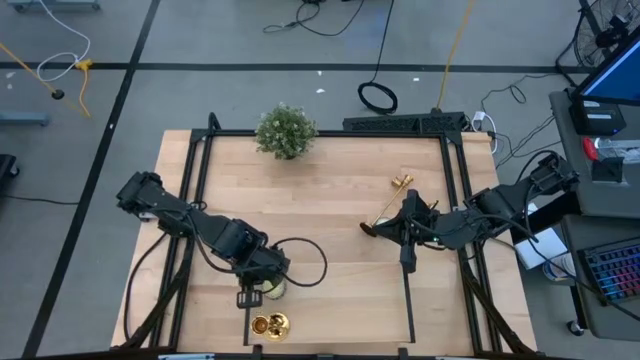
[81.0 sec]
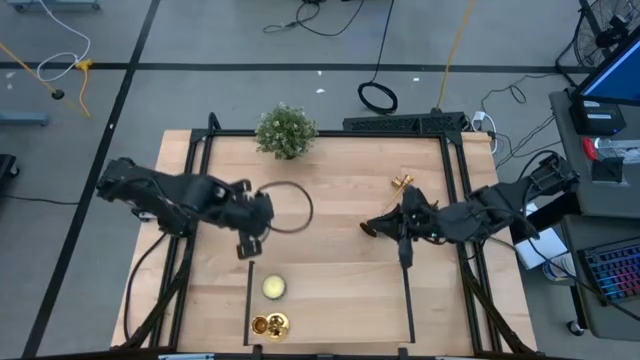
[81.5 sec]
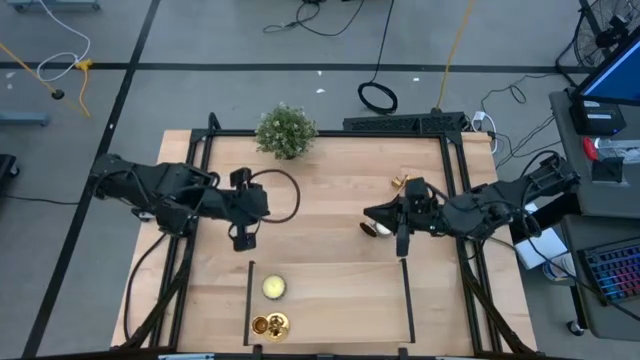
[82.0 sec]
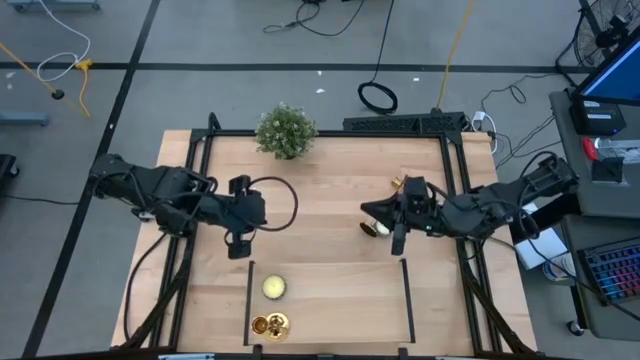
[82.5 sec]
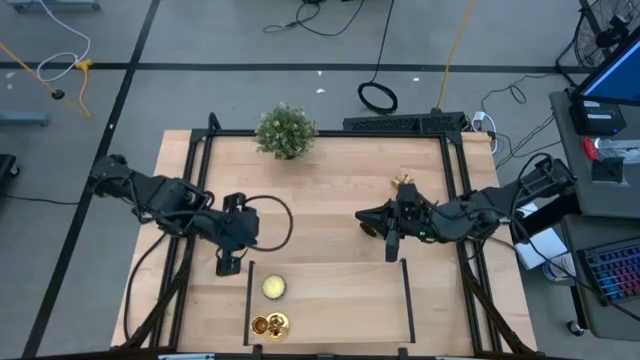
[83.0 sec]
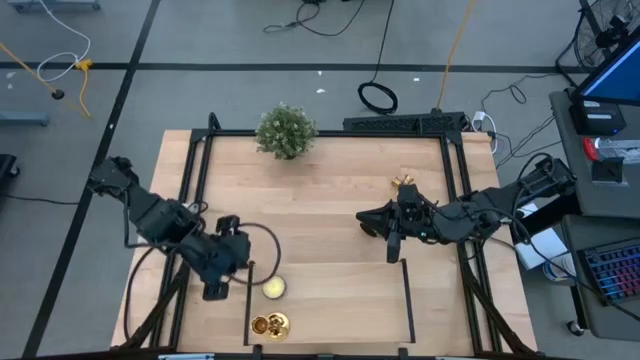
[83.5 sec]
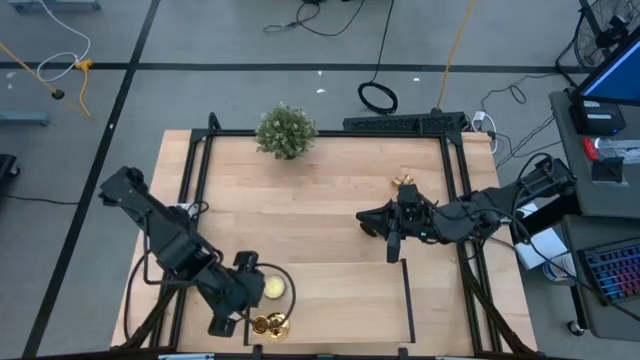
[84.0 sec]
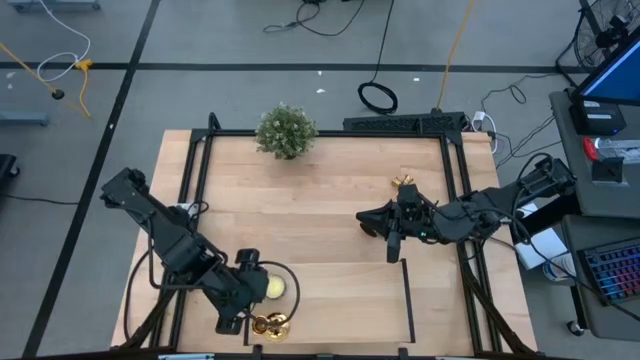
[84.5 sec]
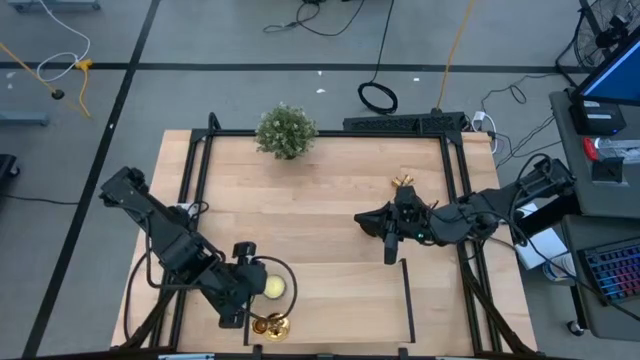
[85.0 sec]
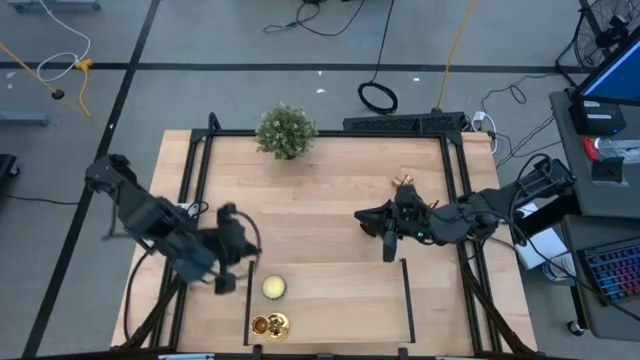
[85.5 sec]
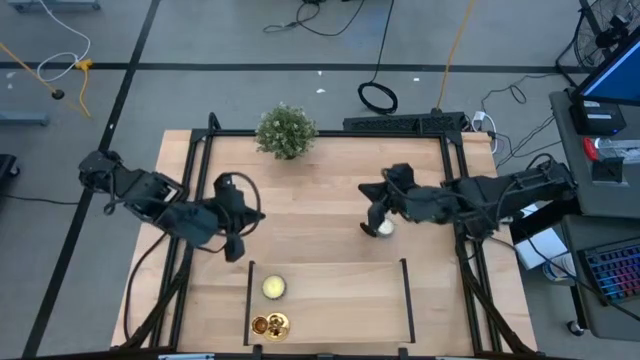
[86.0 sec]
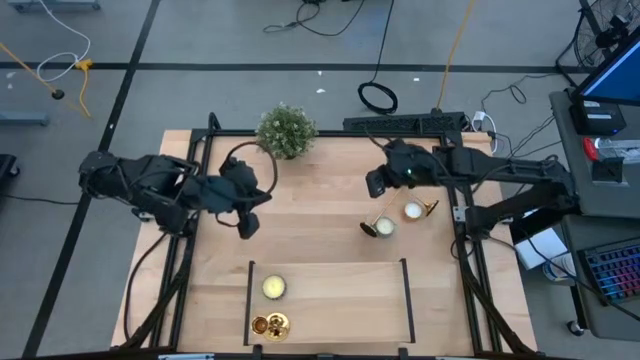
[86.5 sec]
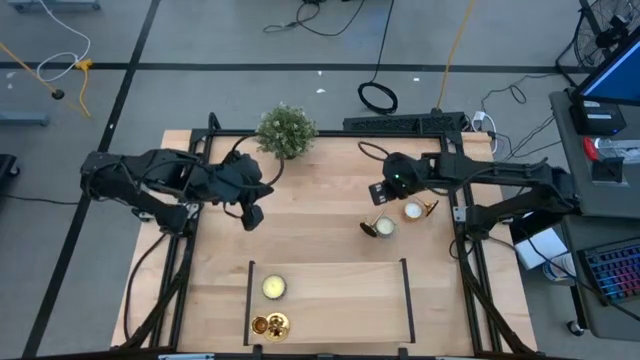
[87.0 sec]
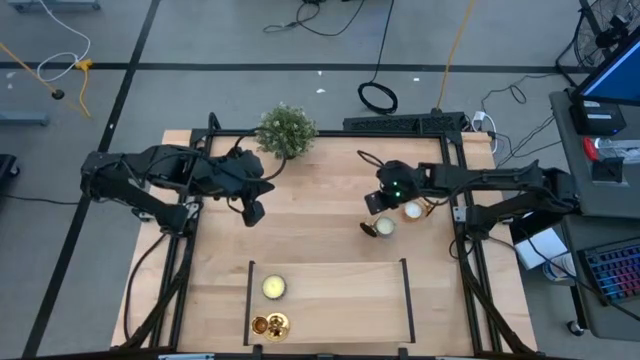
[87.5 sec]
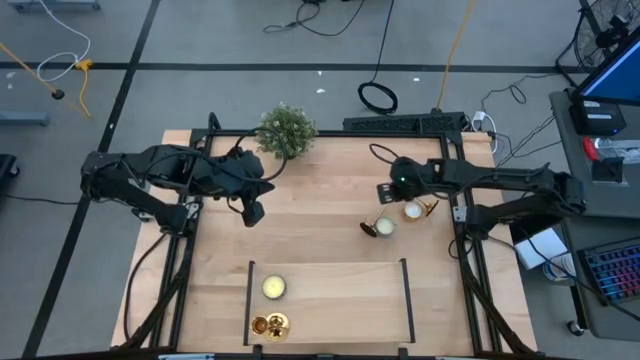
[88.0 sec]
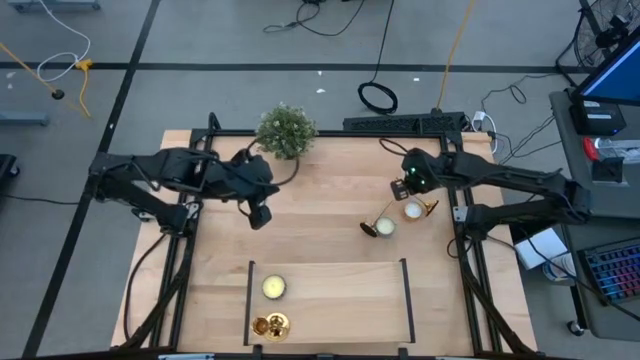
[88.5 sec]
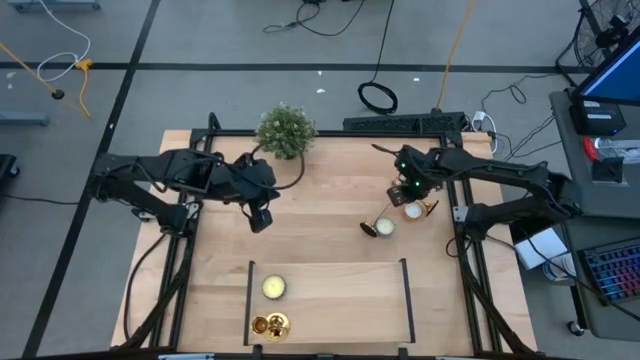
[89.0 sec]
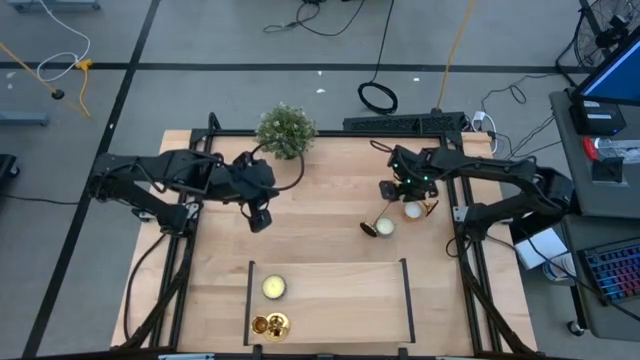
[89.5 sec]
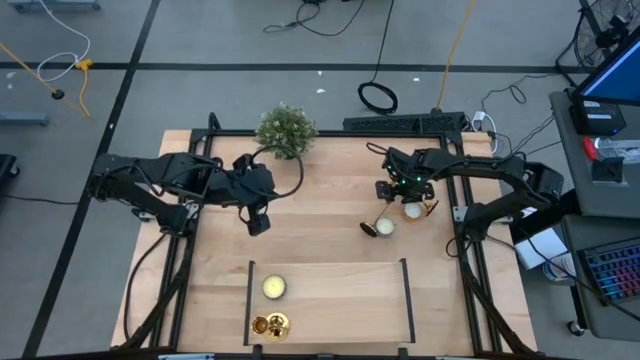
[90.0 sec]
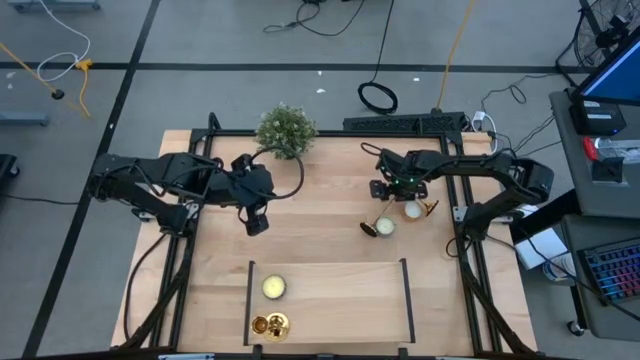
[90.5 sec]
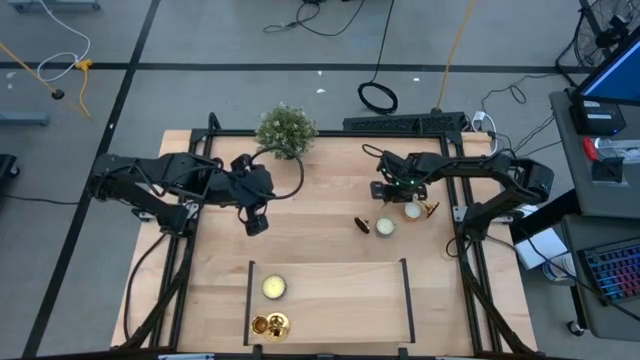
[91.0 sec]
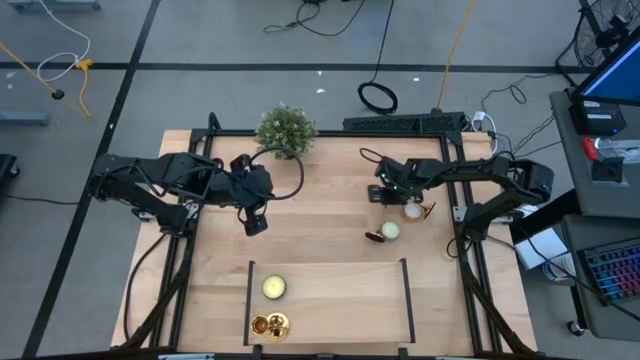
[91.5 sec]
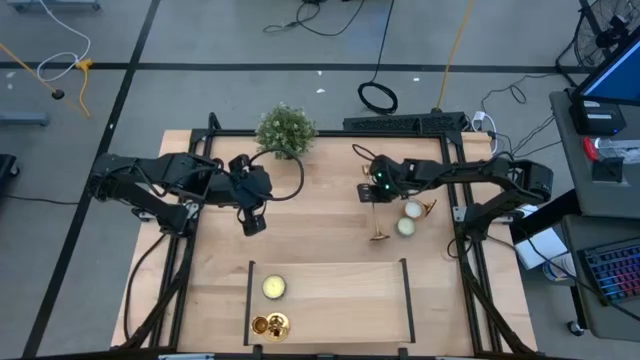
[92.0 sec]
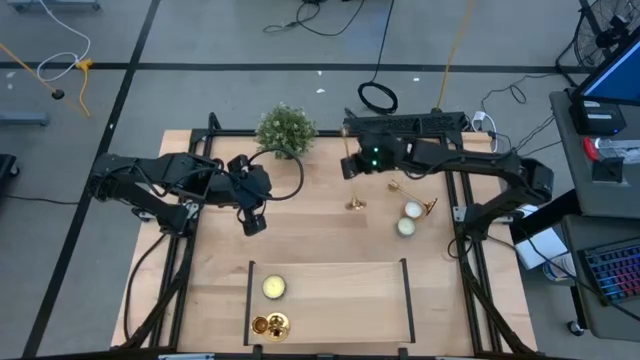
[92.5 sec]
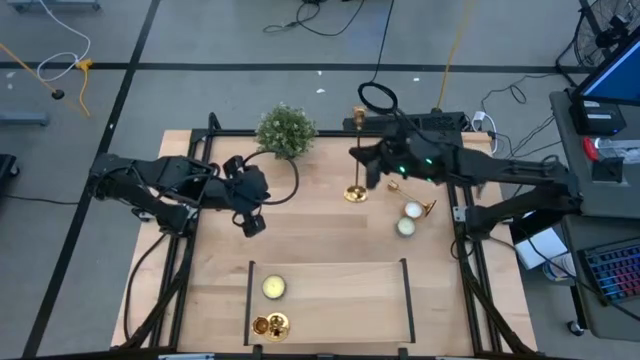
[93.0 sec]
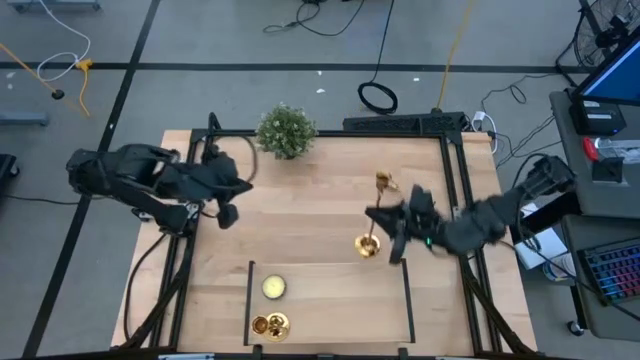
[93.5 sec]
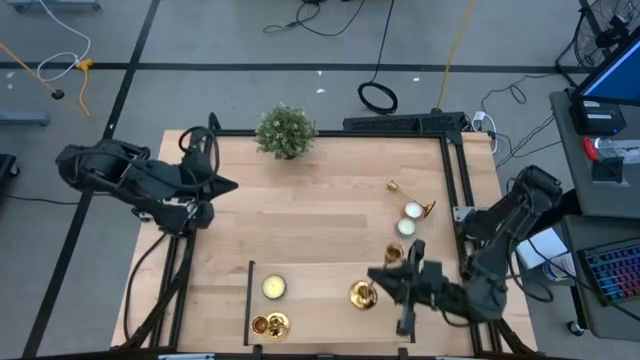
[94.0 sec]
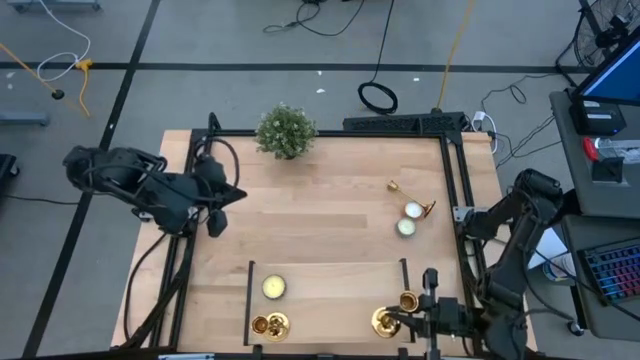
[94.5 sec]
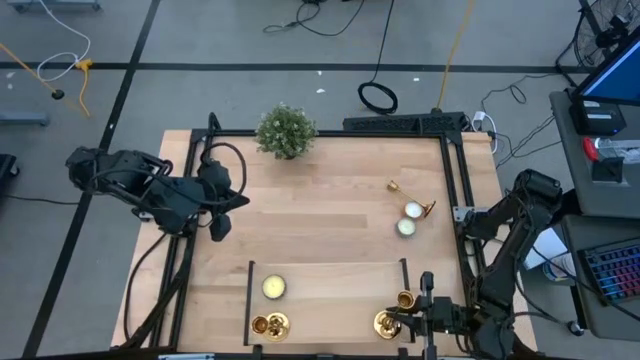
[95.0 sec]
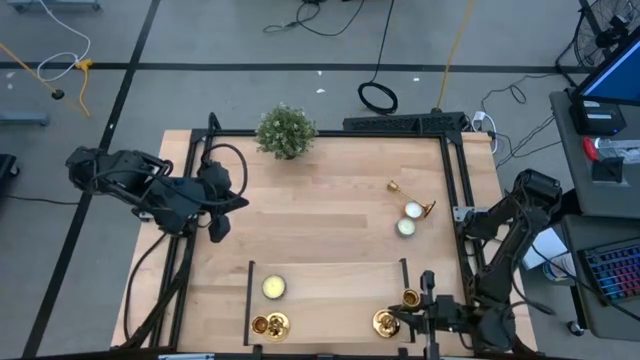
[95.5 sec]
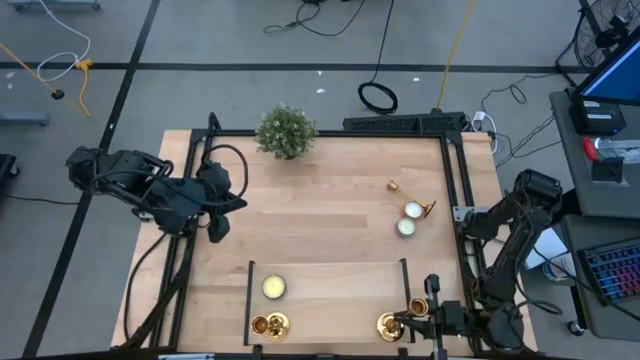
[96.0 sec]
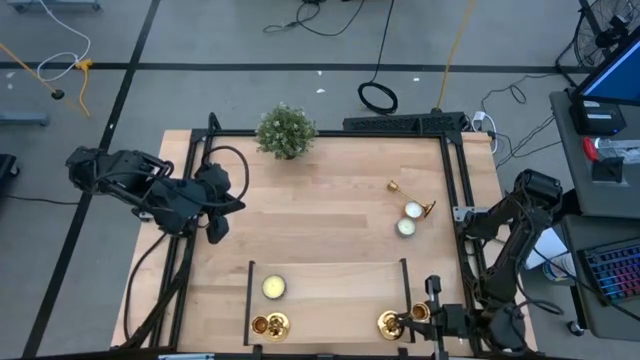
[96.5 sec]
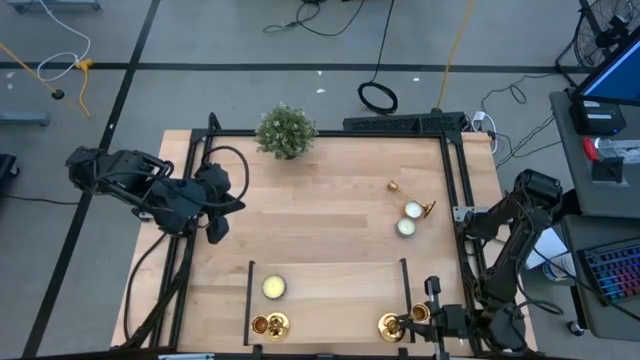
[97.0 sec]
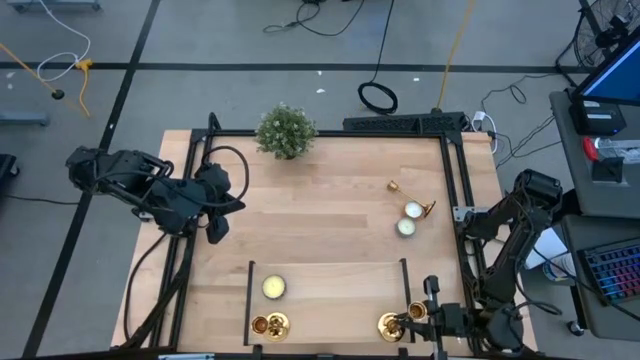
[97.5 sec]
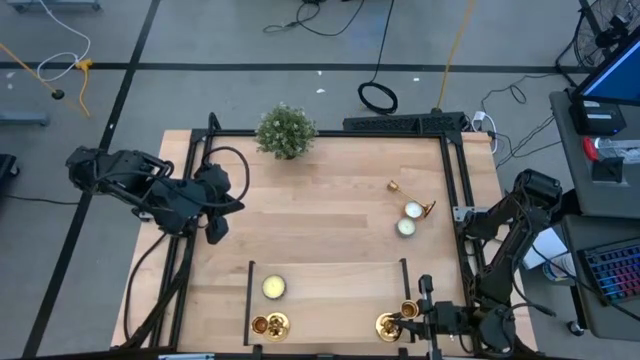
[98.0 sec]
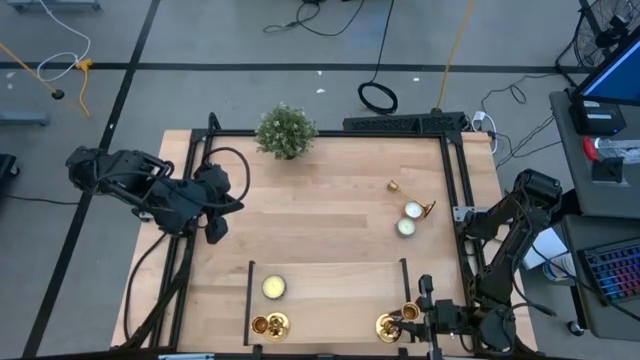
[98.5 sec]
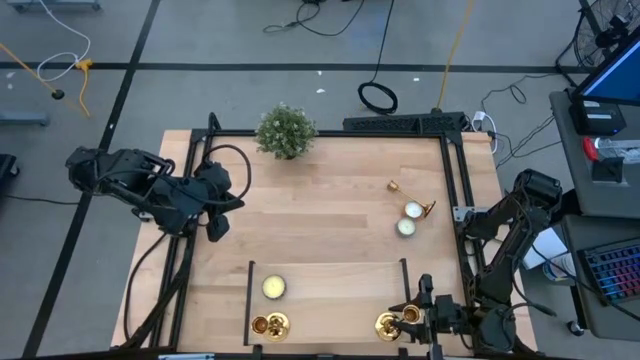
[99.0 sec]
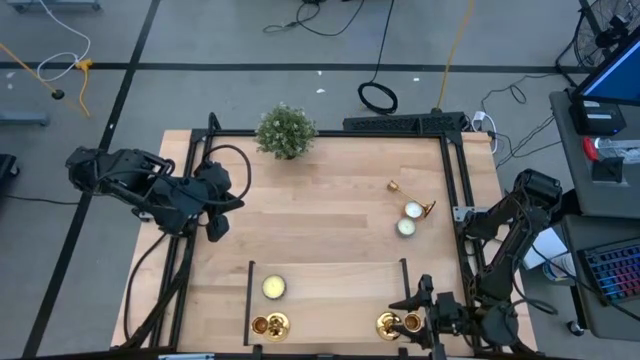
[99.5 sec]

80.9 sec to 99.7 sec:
Task: Pick & Place candle stick holders
Put the left gold candle holder on the shelf

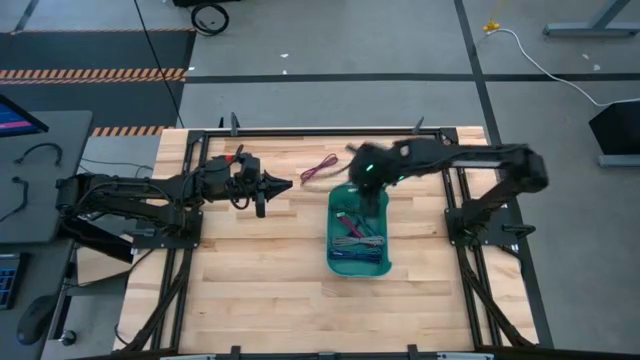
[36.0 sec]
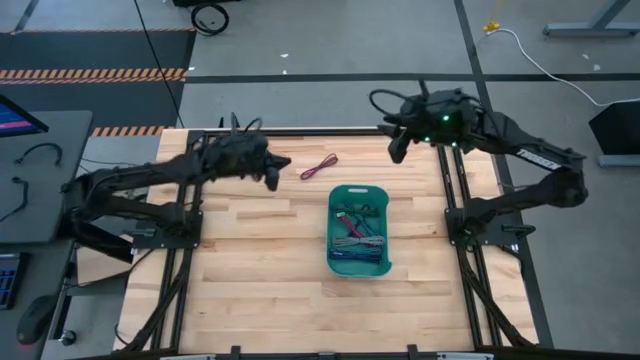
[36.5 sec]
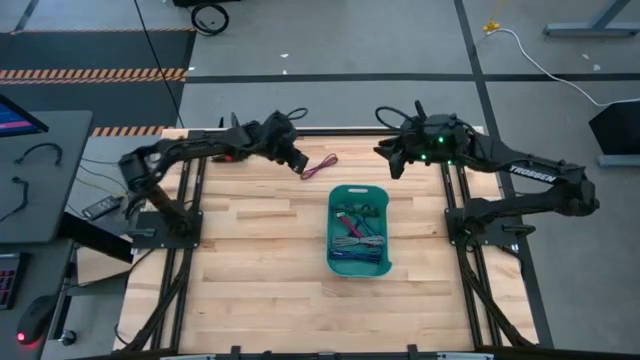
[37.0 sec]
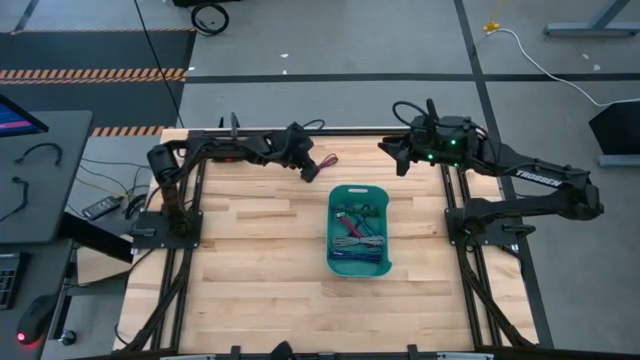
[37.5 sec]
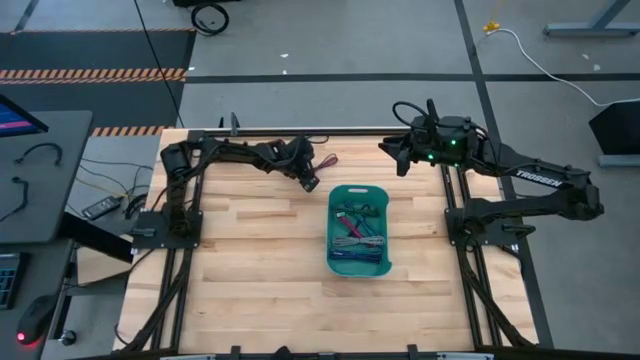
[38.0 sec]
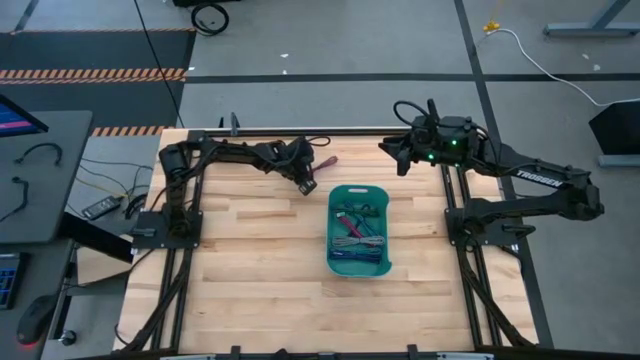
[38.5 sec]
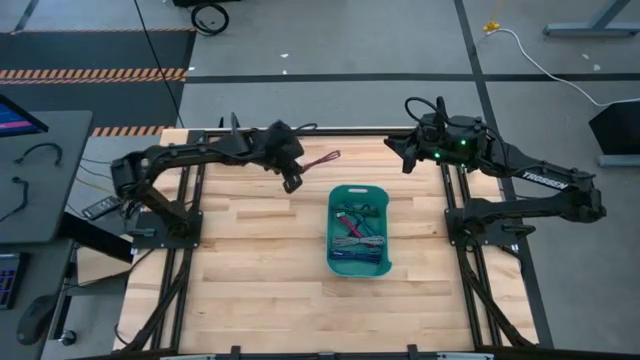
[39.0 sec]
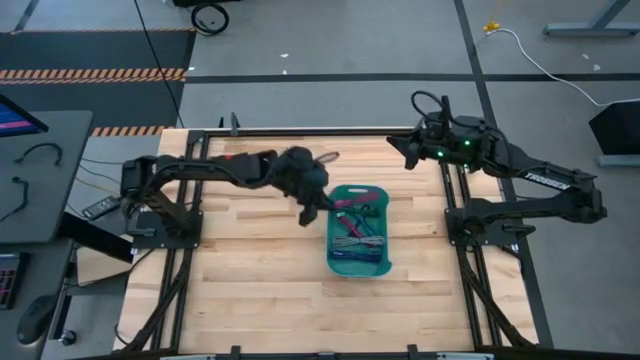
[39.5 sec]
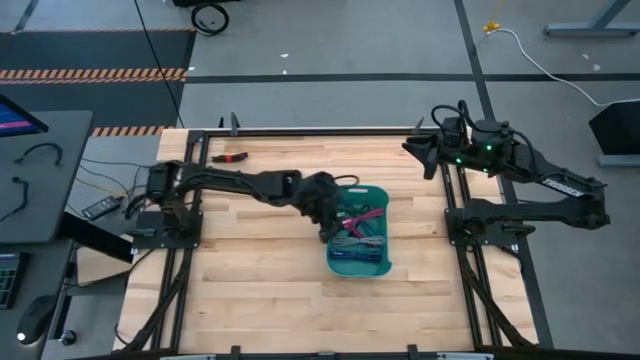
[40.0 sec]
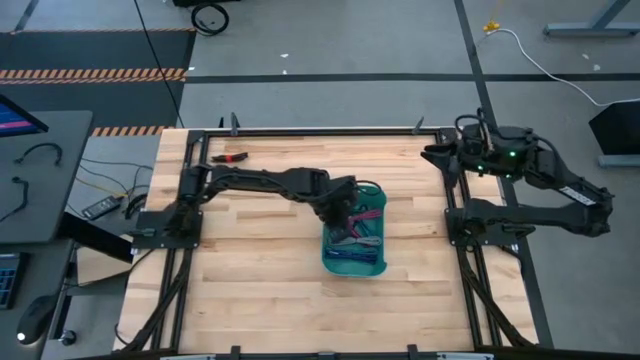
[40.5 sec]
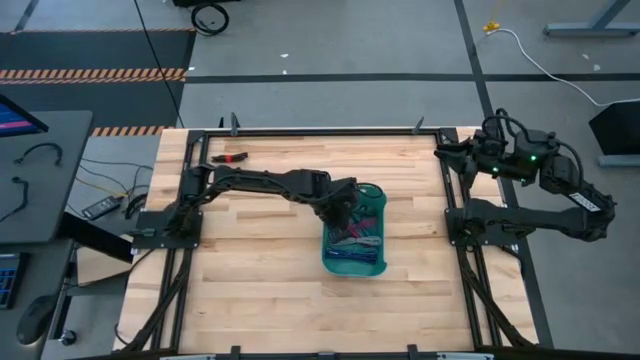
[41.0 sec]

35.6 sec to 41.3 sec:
Task: Pick and place USB-C Cables
Put the light red USB cable into the light green bin
